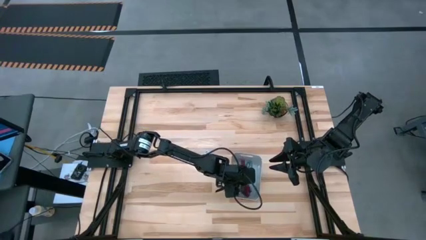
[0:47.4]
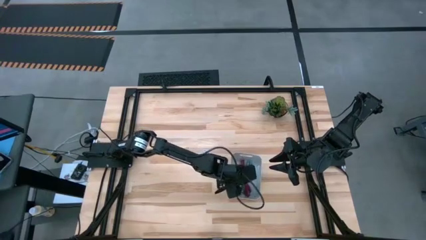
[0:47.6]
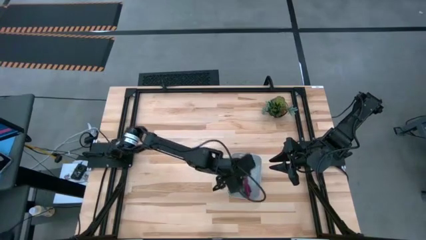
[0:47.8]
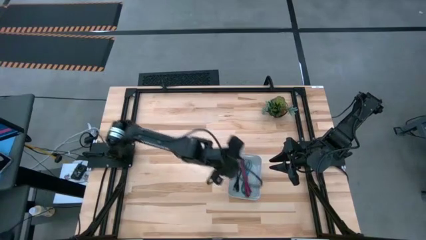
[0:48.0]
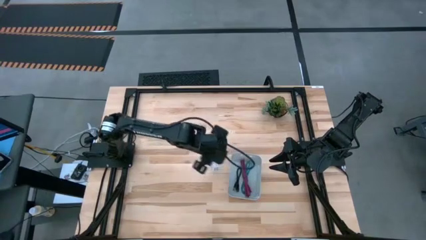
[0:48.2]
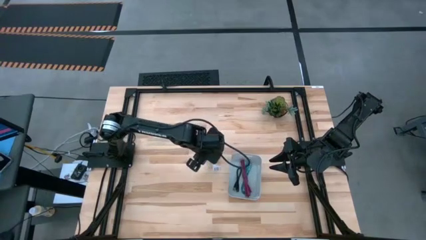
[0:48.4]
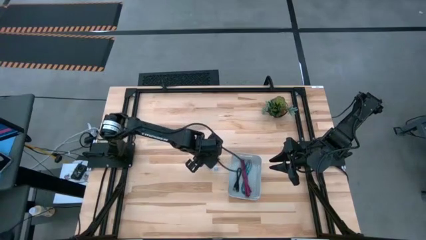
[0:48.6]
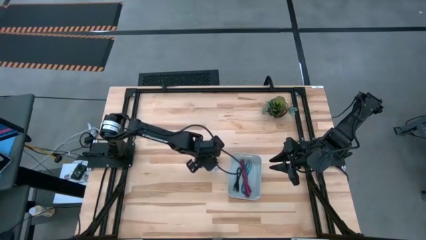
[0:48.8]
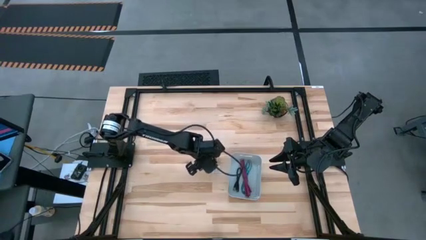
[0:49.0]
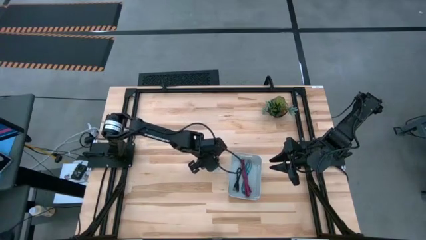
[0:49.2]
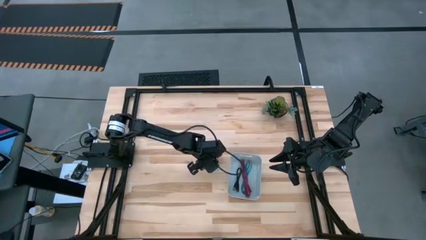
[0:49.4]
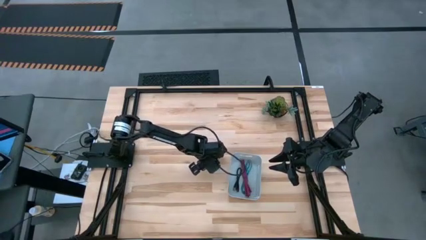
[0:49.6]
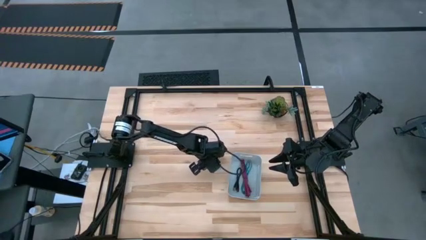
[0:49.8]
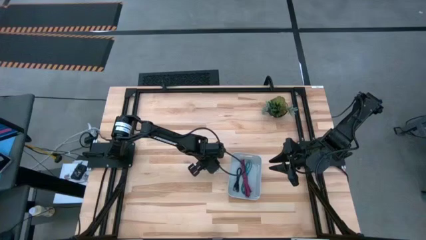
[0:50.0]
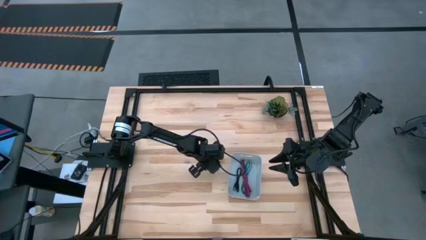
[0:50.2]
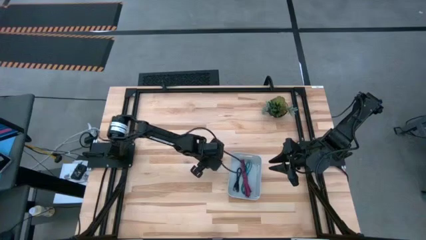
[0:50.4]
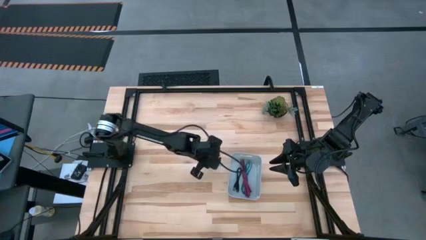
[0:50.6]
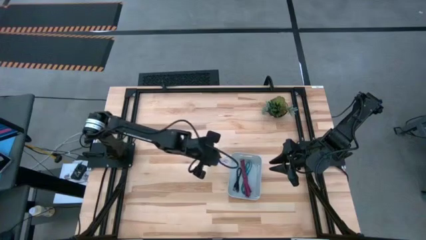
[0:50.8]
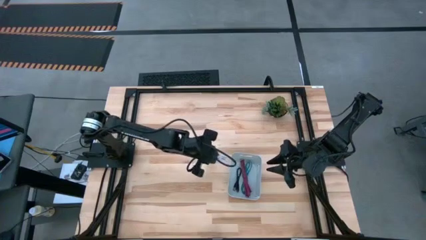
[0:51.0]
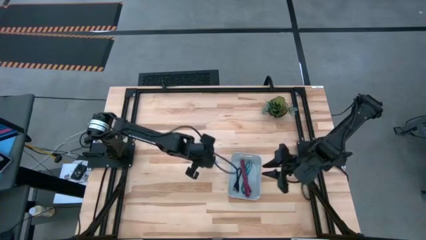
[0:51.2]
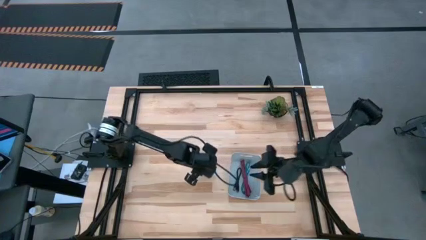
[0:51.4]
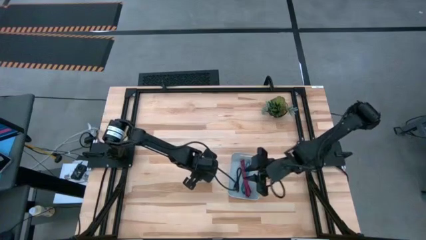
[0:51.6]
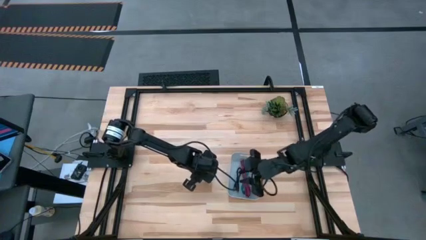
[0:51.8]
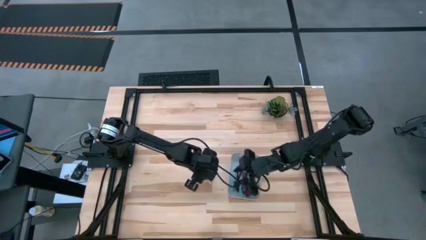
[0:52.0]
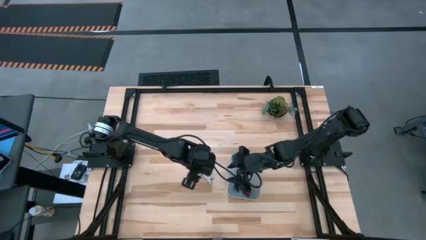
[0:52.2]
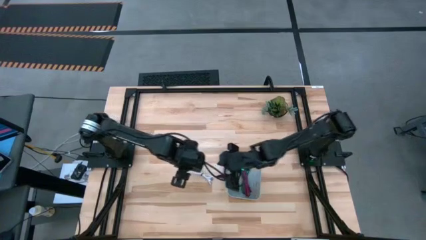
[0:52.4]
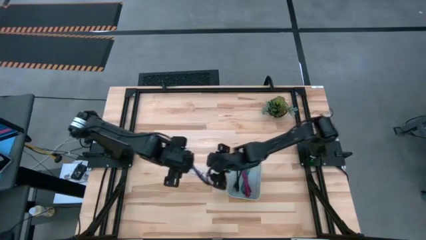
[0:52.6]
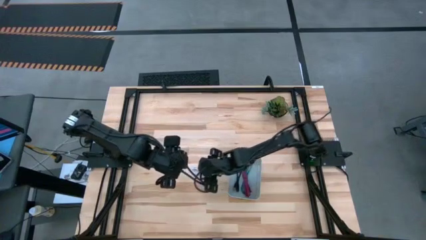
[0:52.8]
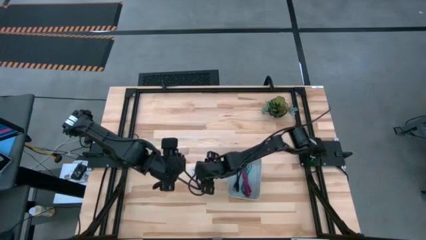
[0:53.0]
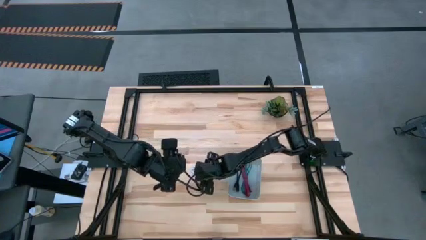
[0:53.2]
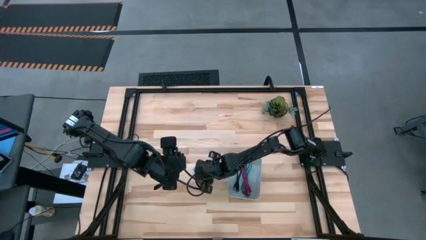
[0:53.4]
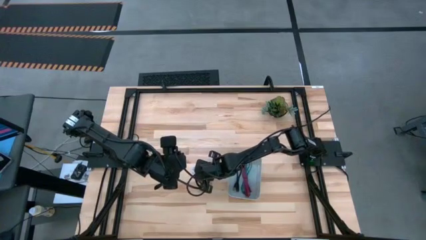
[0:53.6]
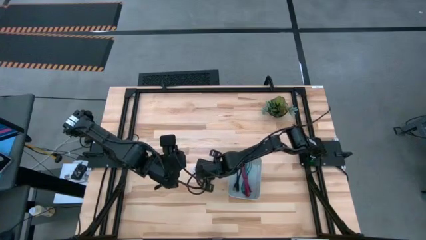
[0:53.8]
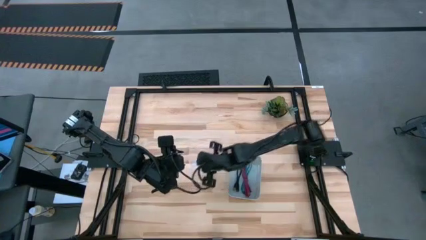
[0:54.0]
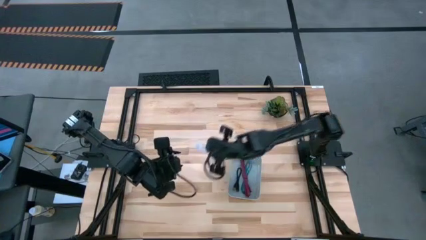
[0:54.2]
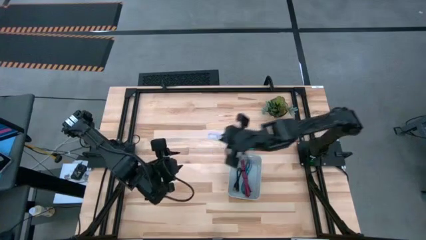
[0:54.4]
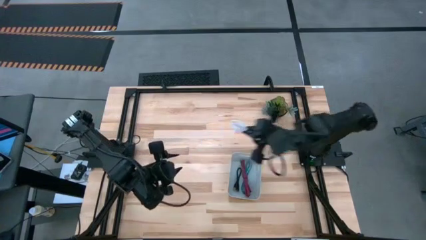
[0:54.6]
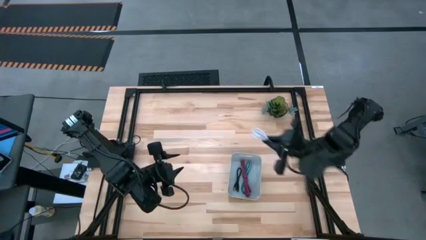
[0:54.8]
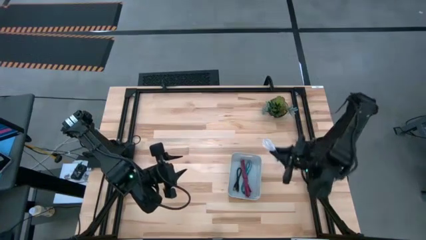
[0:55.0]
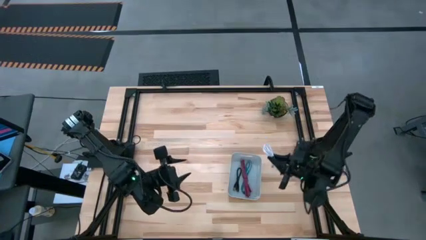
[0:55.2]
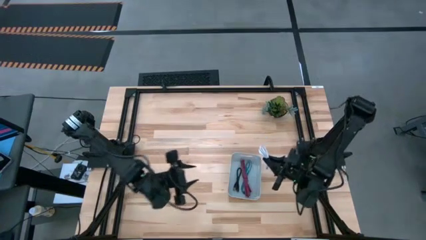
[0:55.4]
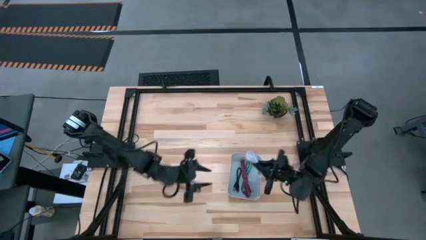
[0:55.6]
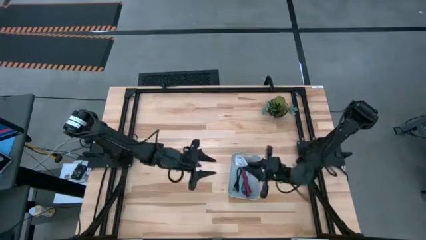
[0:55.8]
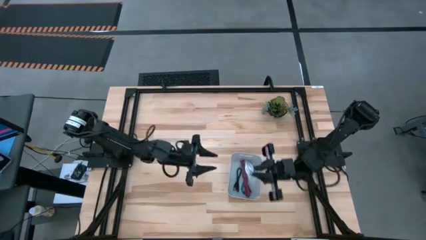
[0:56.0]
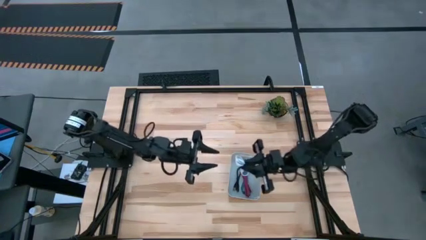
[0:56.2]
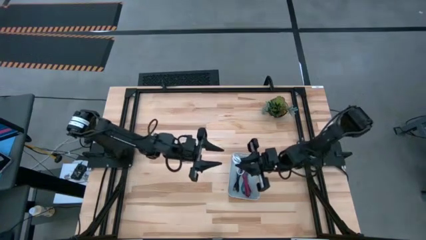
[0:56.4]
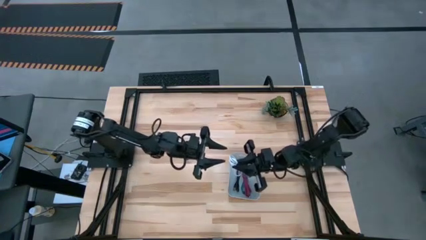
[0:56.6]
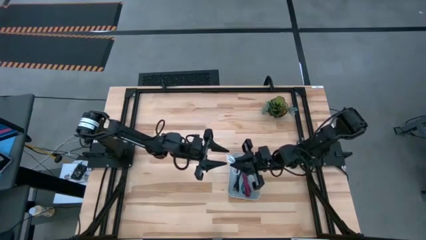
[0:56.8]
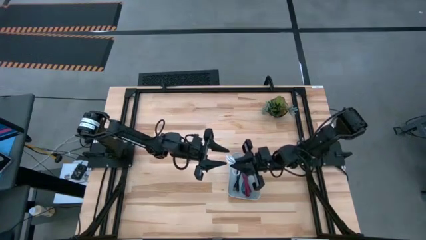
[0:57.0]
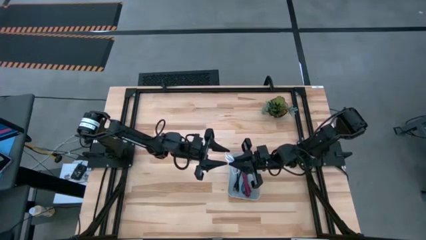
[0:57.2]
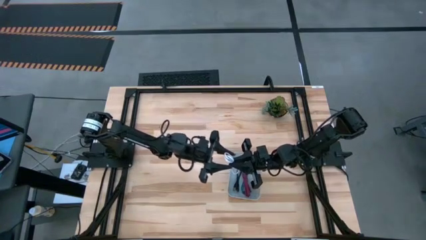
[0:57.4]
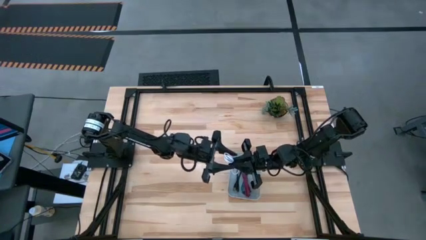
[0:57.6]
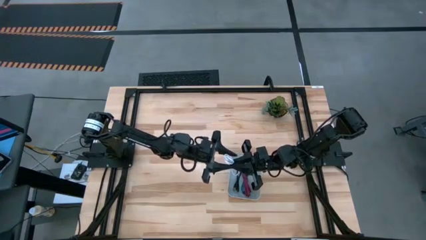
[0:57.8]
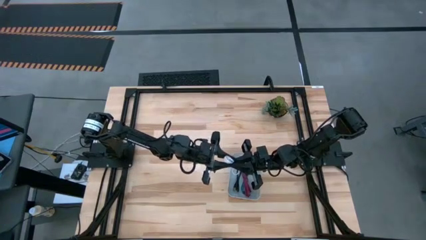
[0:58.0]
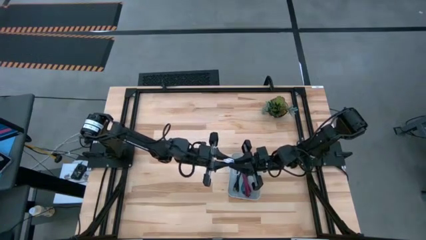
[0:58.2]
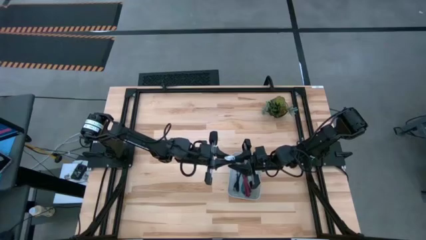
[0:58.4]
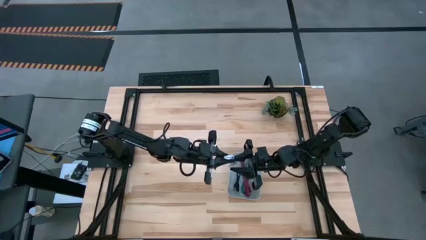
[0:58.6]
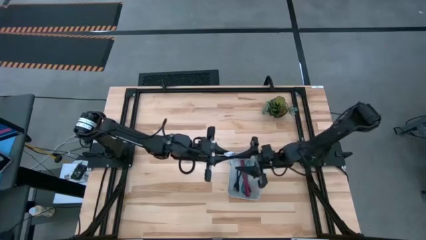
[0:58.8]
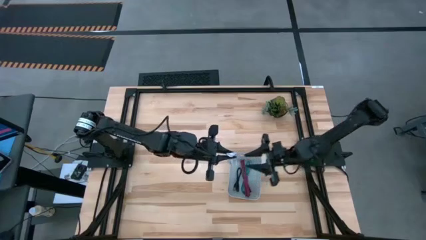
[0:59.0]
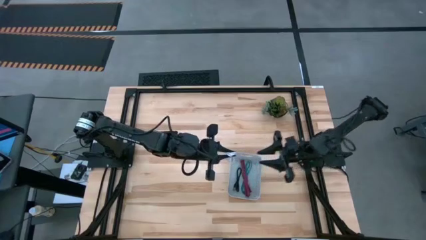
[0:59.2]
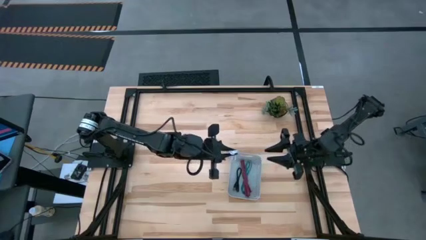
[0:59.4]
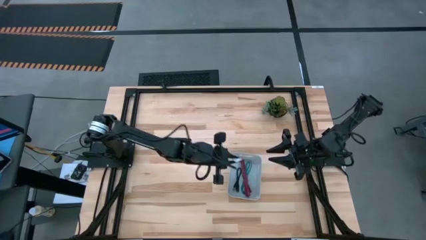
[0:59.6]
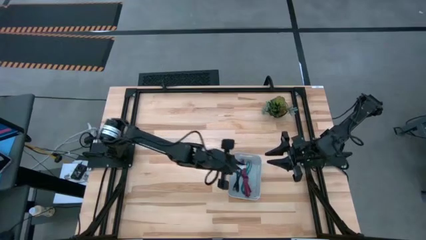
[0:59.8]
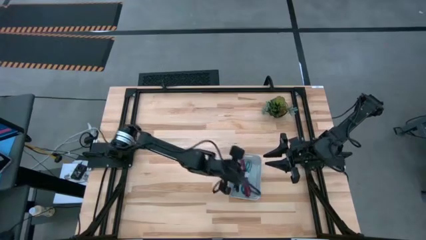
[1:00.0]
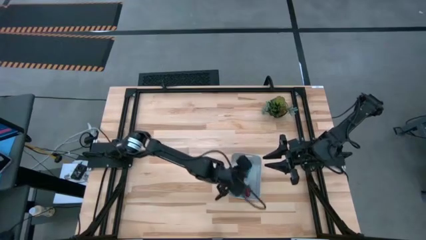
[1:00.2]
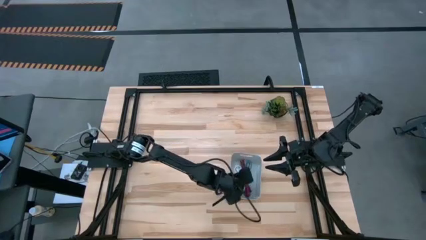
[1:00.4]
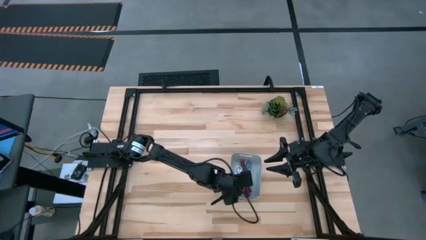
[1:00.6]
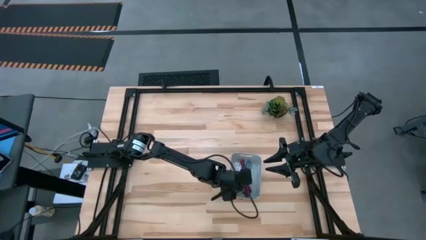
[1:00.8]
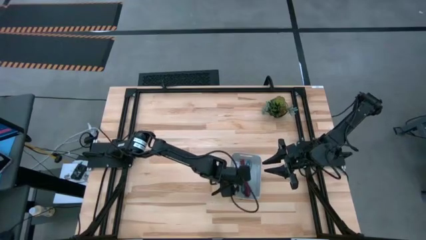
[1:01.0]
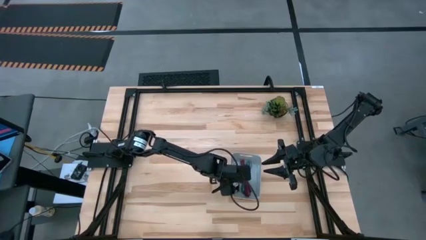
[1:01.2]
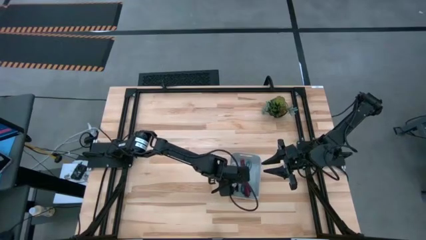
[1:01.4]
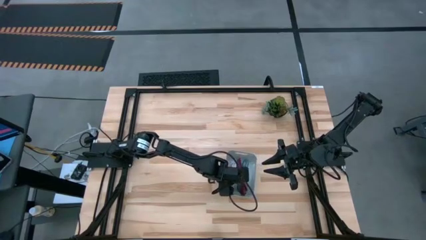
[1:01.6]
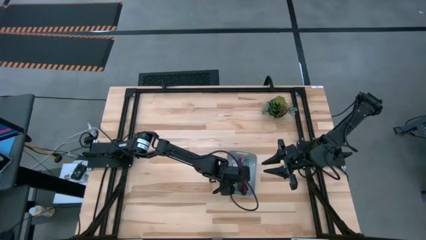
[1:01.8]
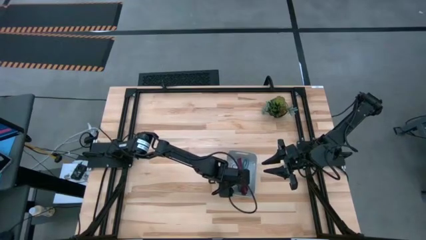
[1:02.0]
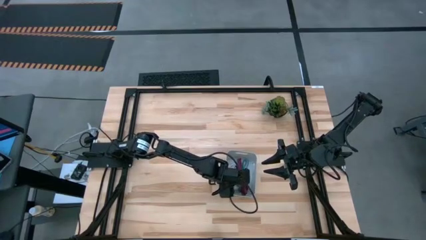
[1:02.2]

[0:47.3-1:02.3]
Task: Pick and place USB-C Cables
Put the white charger cable into the gray bin
